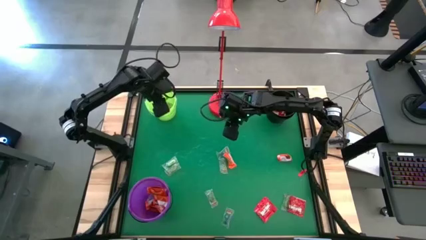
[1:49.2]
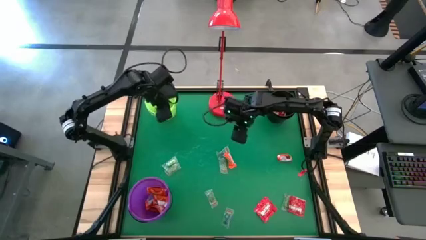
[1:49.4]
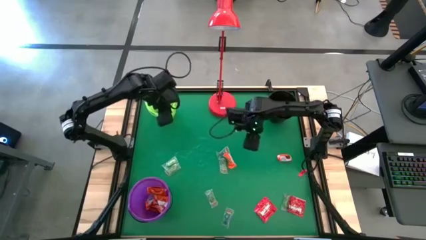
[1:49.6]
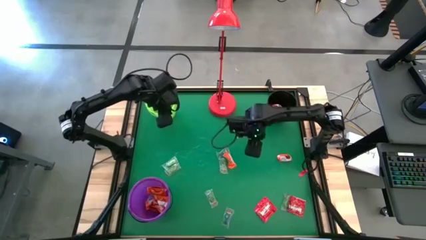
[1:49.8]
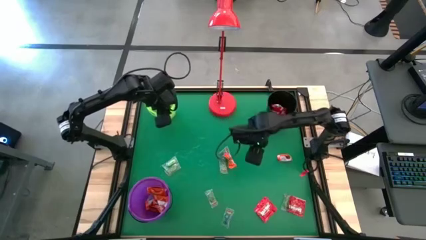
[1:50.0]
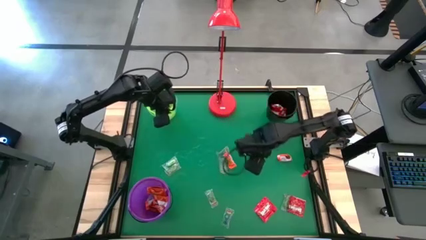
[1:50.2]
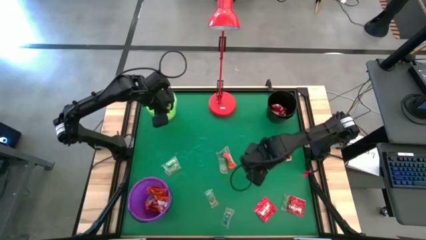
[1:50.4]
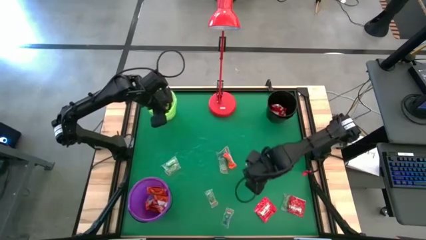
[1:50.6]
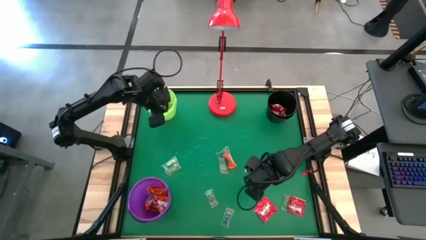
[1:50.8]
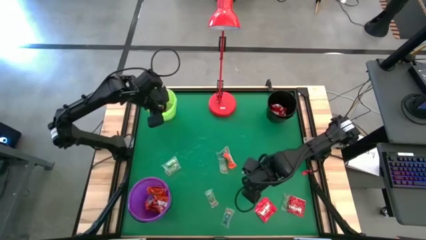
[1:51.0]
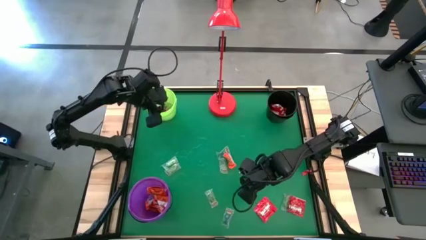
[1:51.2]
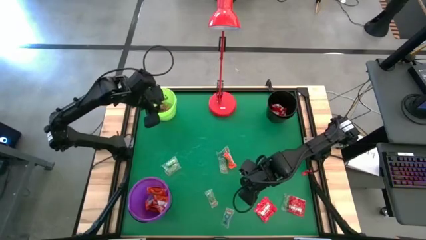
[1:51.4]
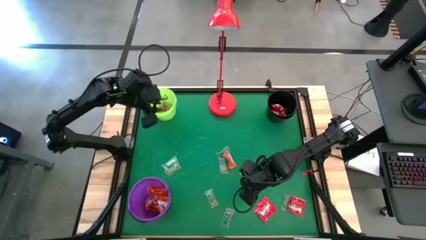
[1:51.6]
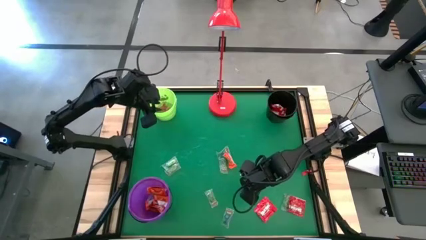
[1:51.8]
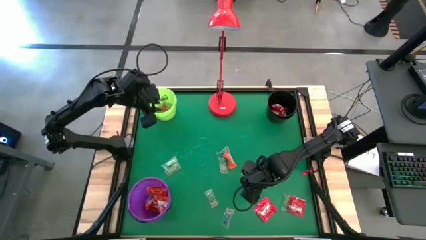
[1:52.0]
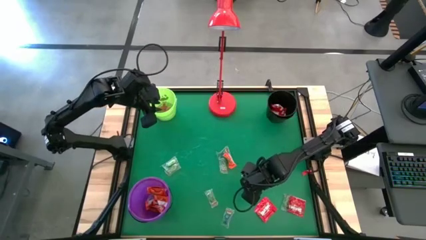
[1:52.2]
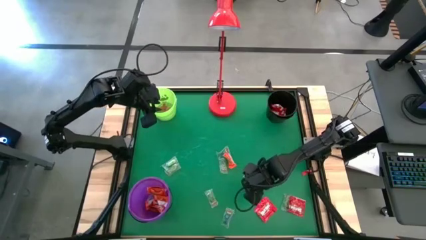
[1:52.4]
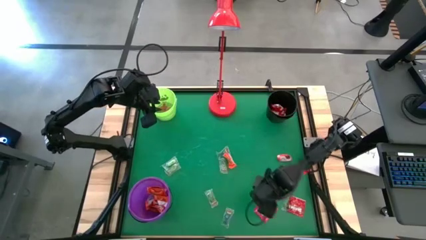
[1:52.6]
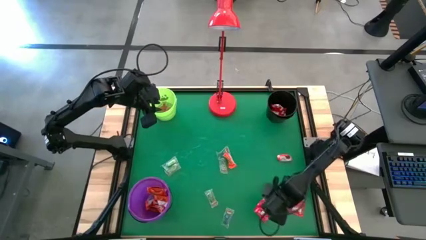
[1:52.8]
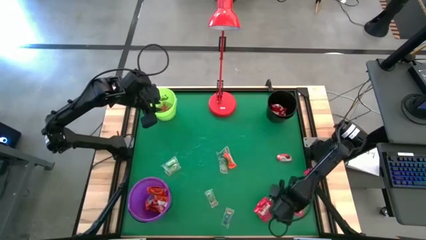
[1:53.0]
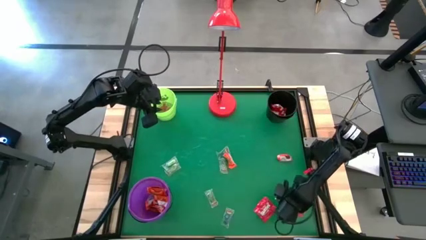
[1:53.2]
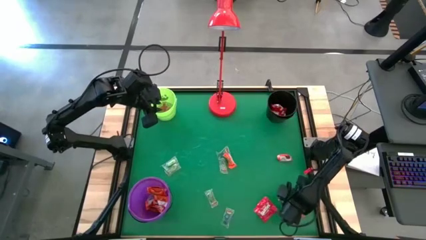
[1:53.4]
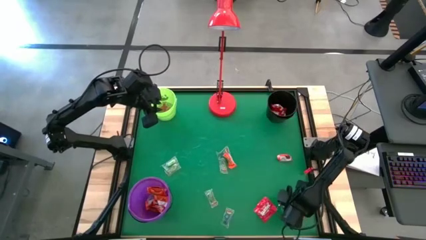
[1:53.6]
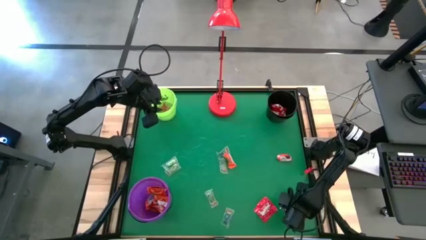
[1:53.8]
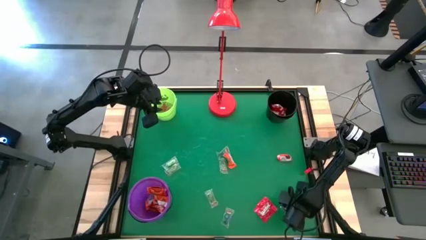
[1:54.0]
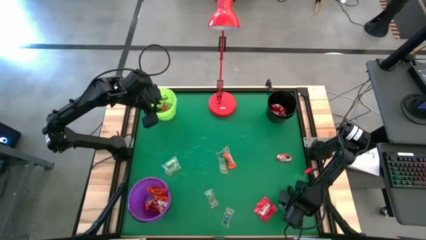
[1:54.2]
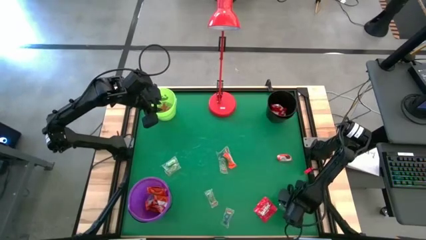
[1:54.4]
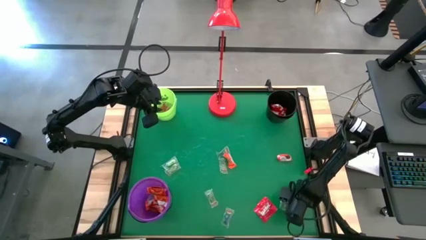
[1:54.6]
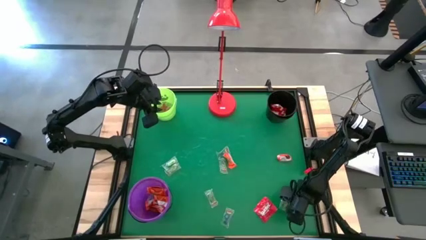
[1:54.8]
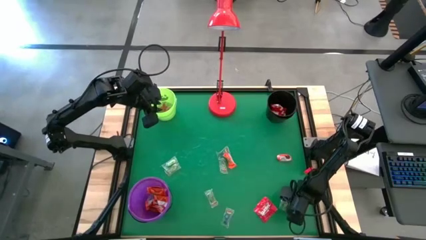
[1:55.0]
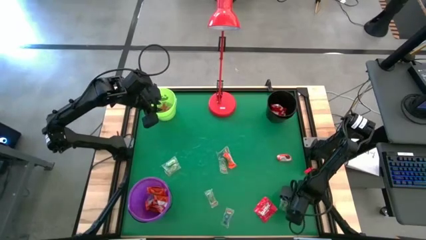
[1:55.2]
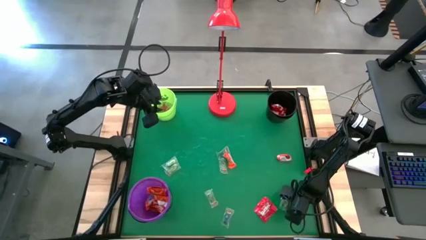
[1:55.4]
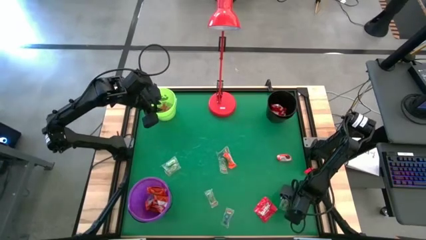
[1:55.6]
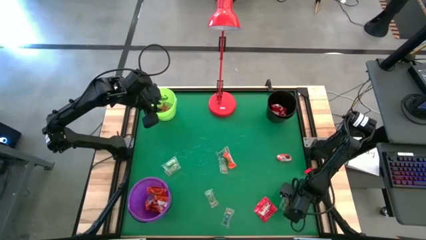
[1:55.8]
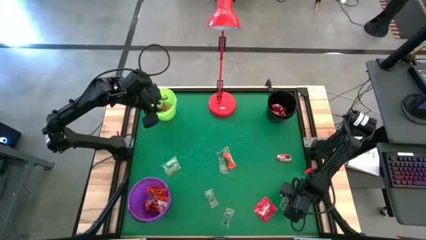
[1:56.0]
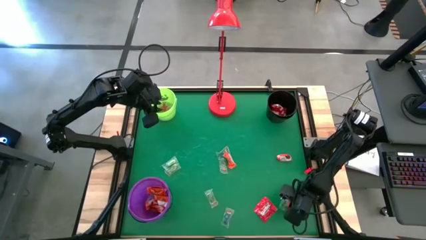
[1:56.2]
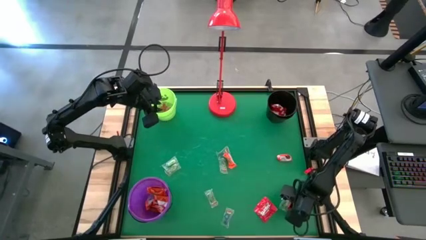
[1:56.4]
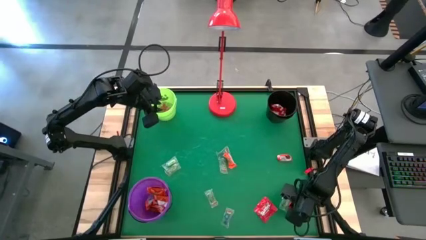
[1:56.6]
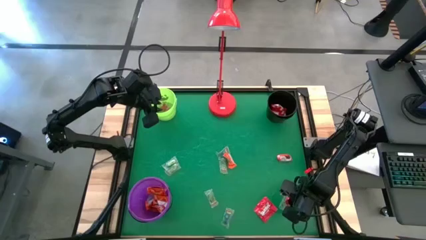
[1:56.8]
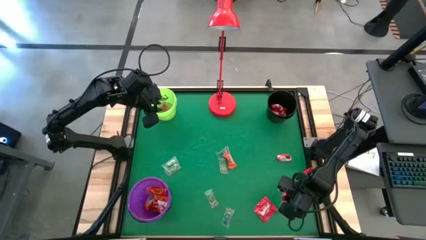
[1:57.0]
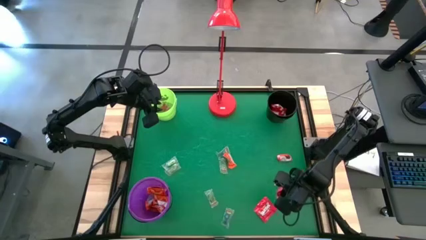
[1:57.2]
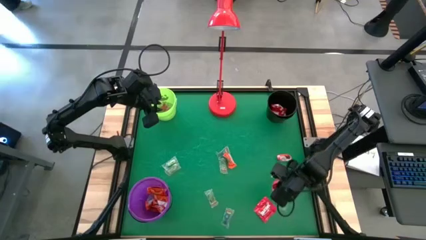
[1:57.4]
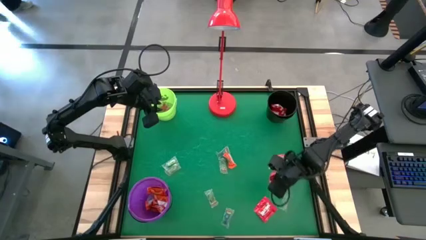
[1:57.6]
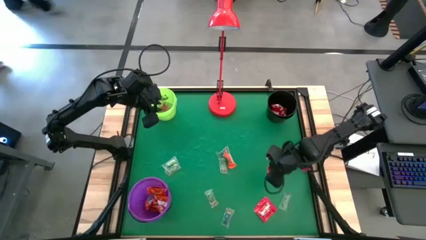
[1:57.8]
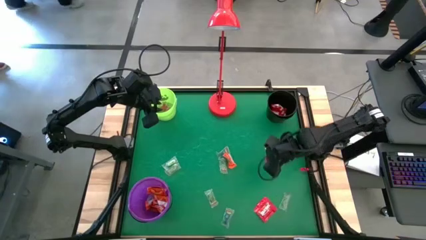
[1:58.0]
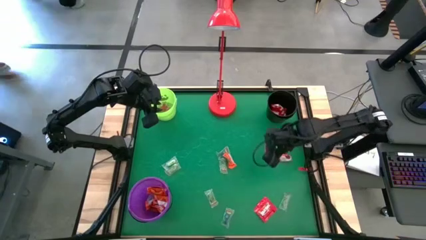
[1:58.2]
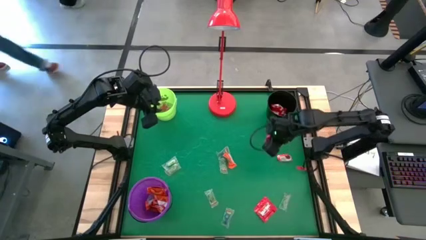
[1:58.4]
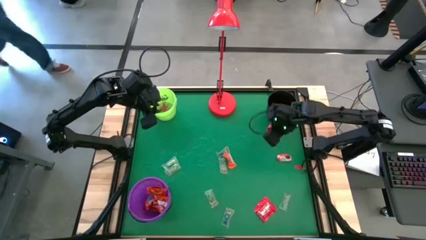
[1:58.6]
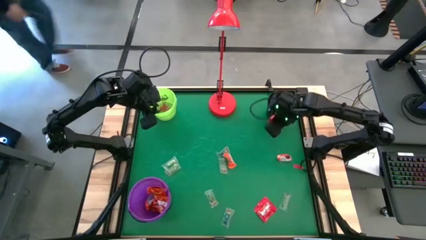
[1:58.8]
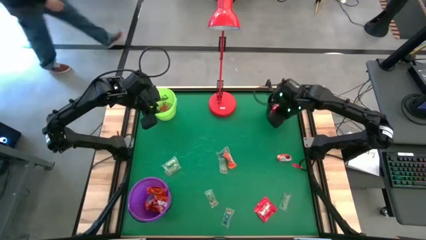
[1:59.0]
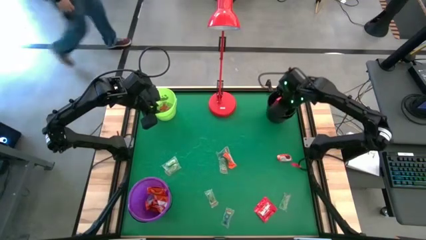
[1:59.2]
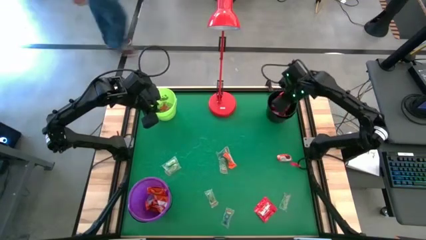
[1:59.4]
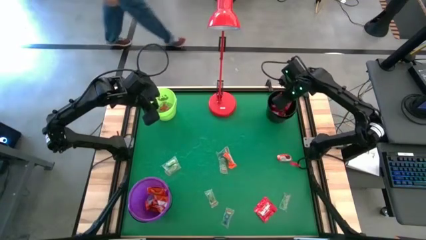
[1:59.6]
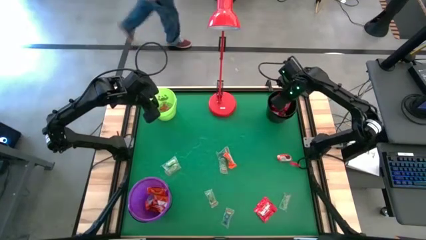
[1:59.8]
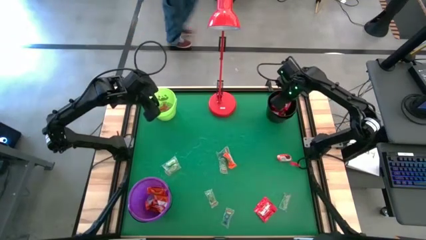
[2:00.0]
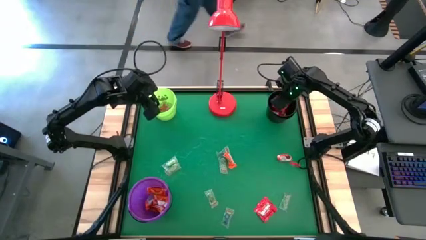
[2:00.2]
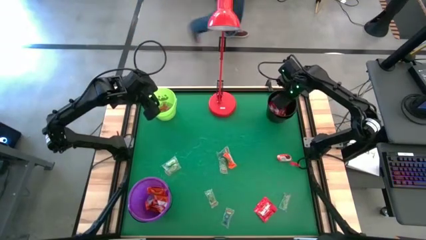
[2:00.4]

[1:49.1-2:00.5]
Task: Sort candy
Put the red candy into the black bucket
